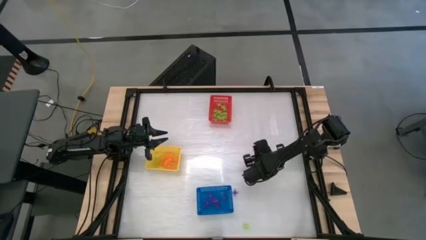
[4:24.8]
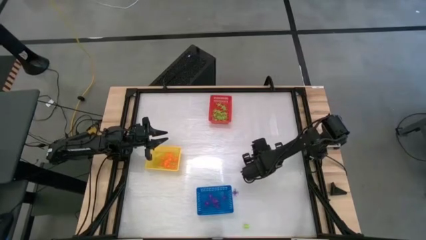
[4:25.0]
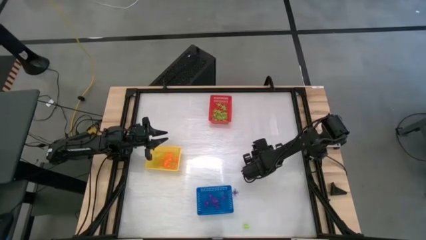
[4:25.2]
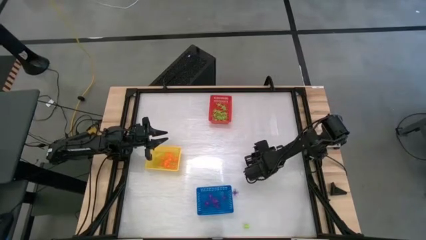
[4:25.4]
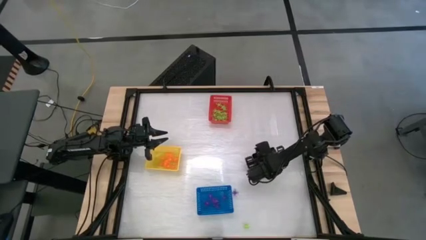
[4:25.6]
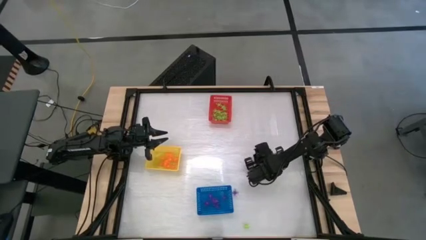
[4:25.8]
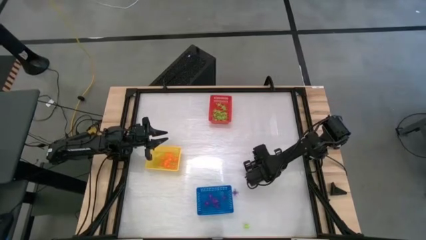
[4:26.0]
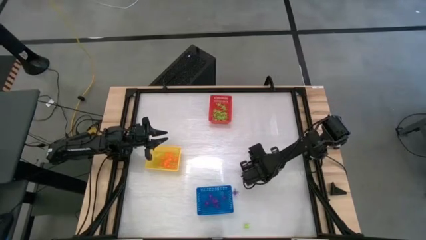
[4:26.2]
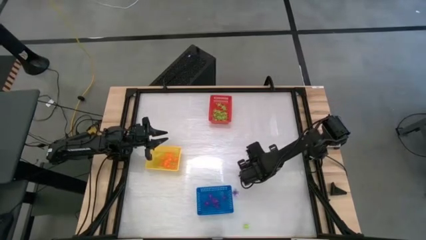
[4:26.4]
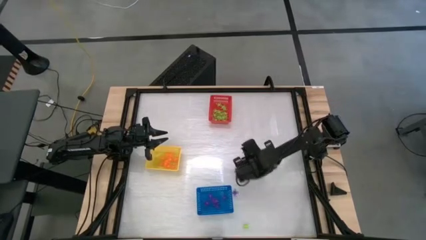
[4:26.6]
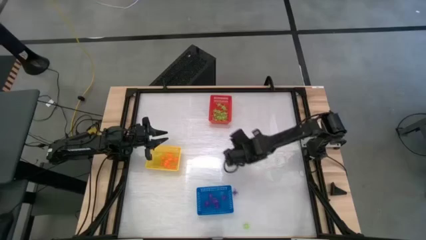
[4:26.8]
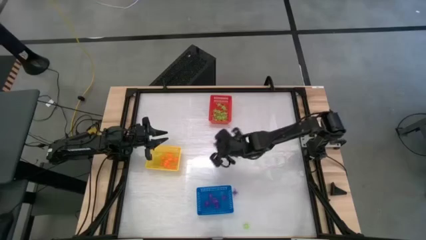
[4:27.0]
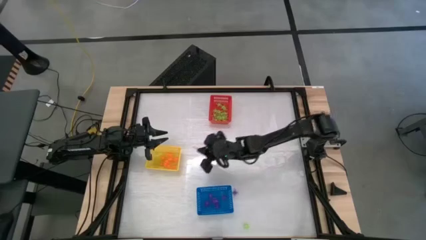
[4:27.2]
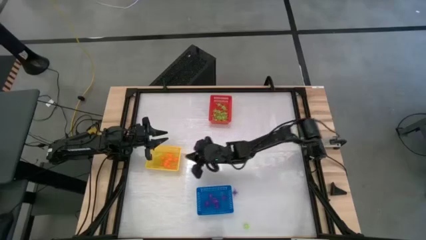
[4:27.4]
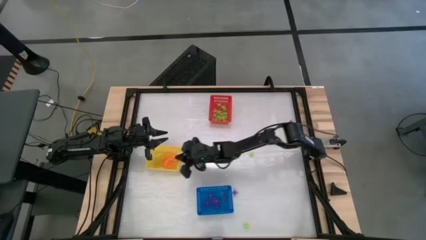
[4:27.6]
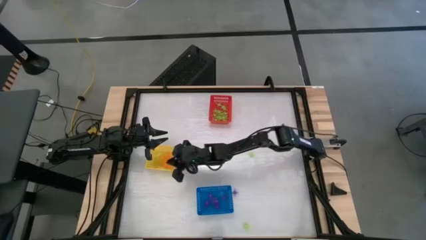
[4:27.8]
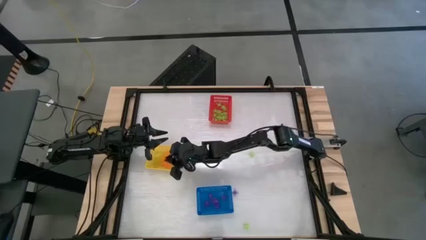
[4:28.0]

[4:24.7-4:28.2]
Task: Sort Halloween decoration
Put the orange spider toy into the yellow basket

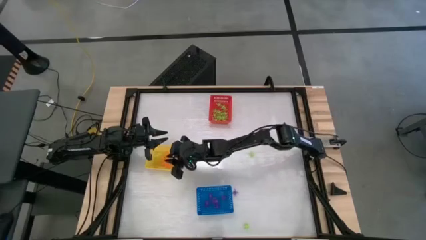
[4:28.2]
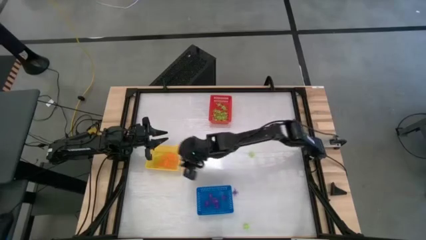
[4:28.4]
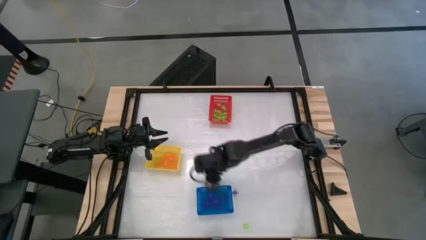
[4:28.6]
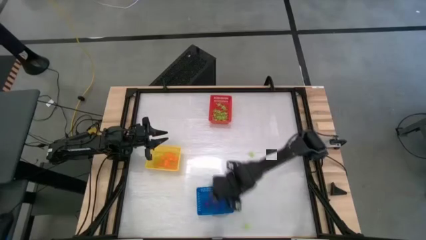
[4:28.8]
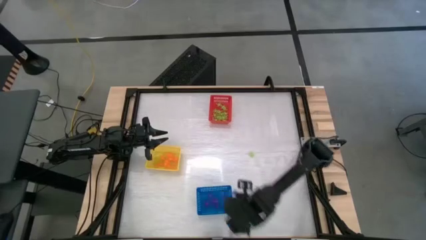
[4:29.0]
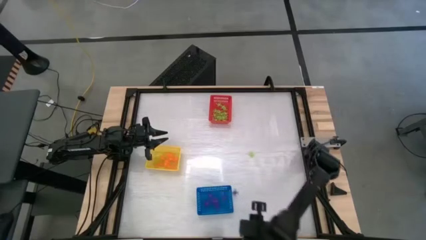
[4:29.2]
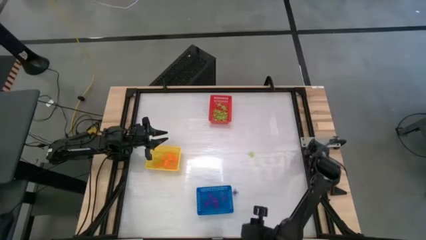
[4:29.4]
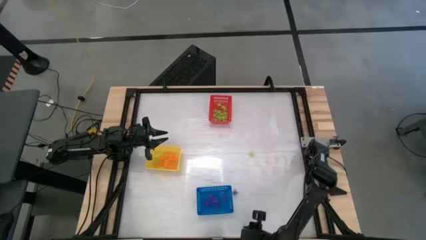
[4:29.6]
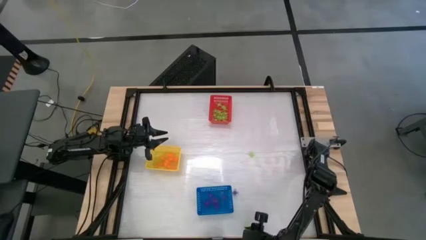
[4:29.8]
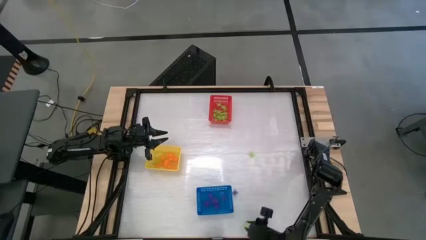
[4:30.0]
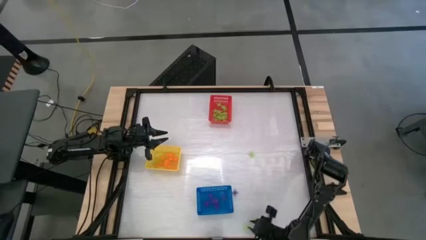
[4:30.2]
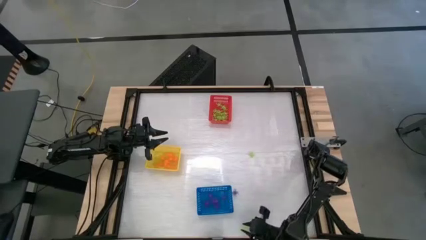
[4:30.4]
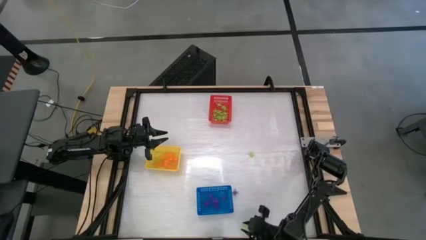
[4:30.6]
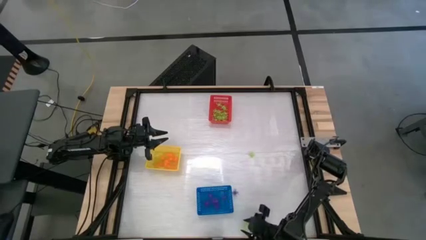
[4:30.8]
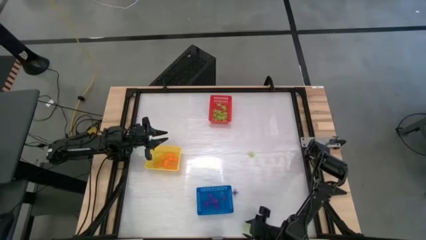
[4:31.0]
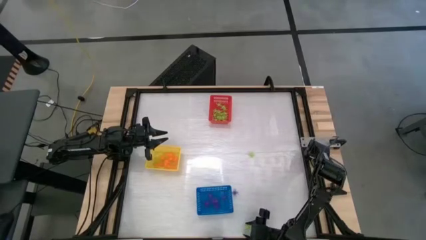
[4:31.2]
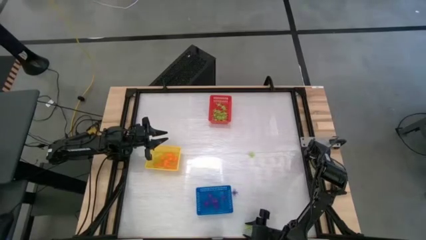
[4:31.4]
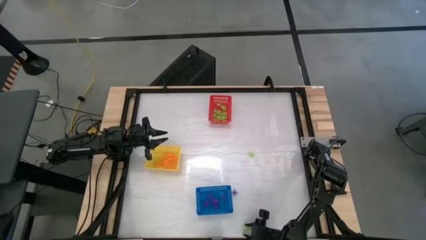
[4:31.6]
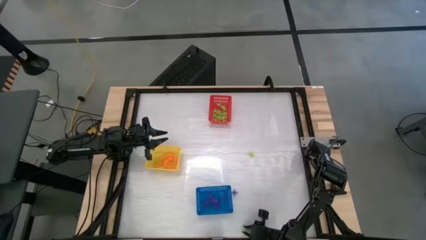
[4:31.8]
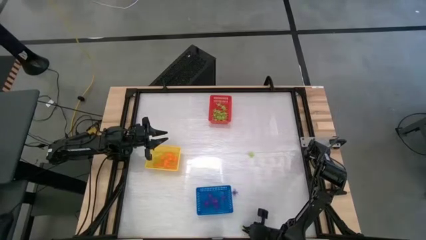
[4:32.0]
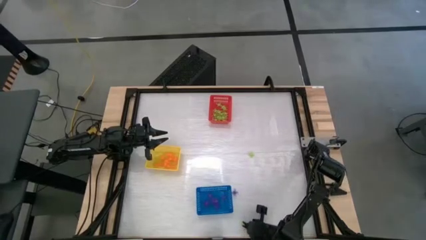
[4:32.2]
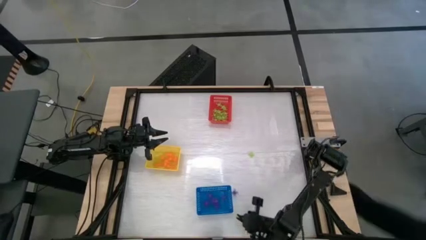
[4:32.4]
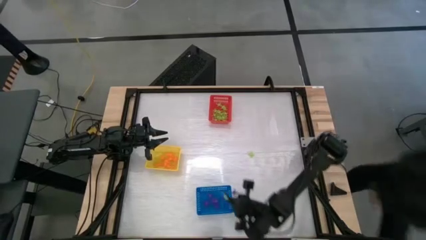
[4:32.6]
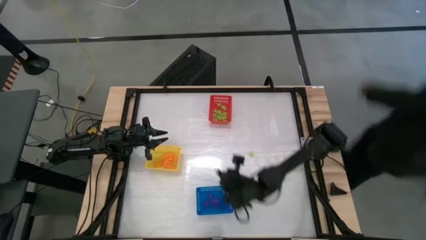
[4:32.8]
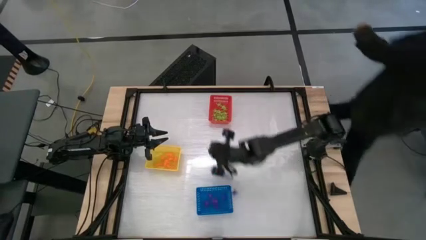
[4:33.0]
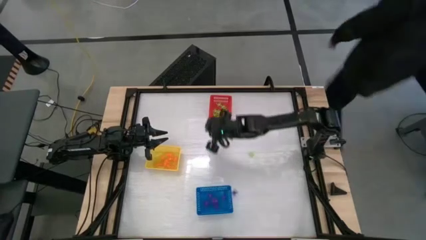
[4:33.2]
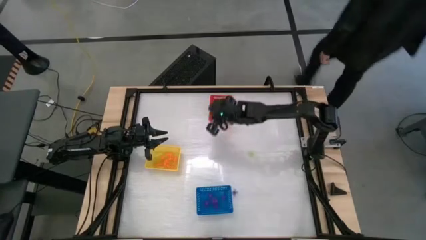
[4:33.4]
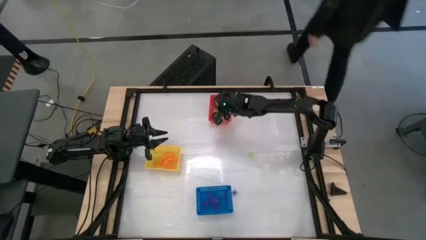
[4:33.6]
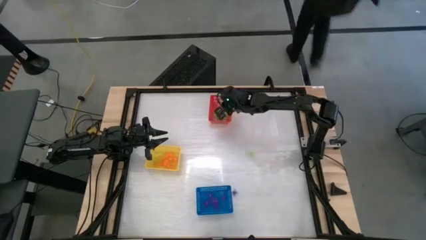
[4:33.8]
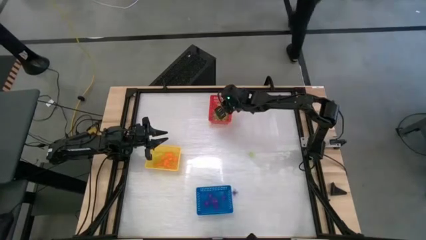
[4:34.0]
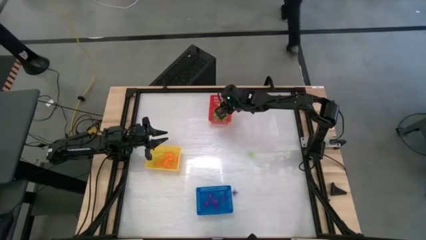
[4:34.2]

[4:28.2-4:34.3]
Put the green spider toy into the red basket

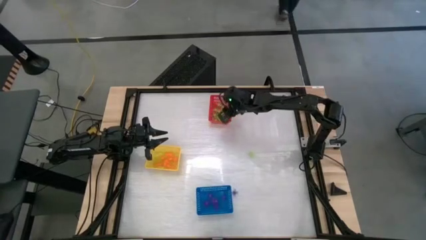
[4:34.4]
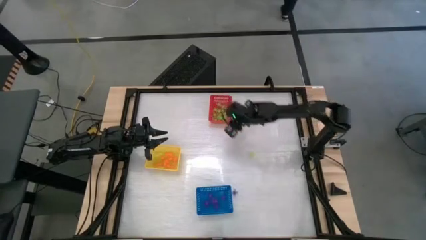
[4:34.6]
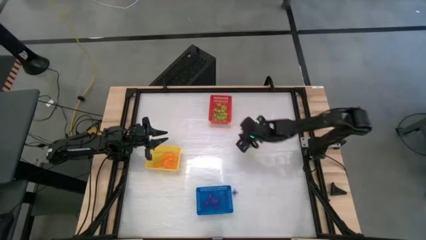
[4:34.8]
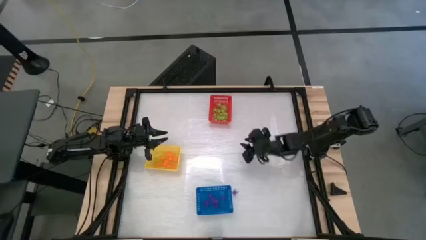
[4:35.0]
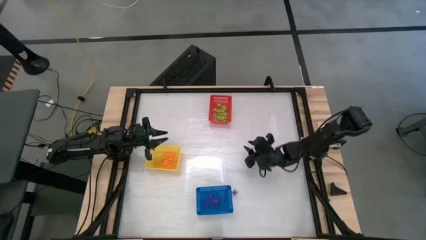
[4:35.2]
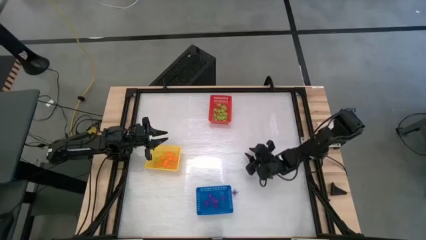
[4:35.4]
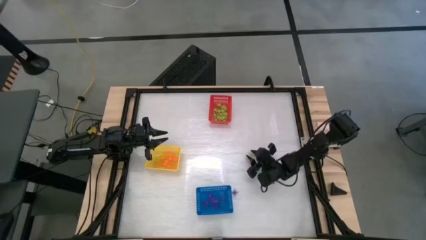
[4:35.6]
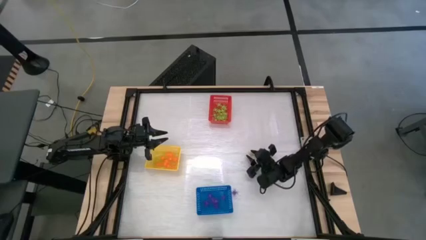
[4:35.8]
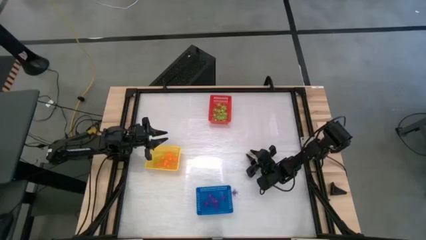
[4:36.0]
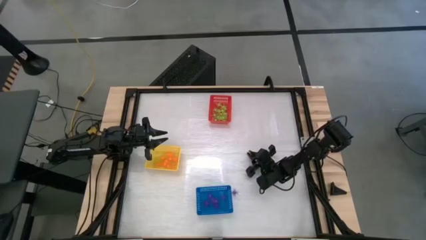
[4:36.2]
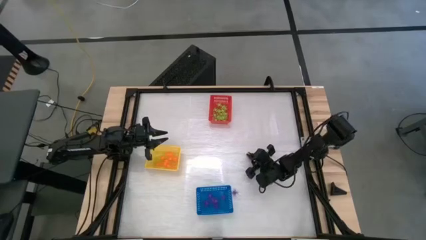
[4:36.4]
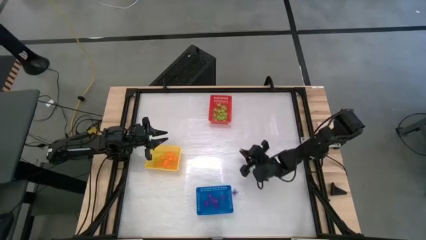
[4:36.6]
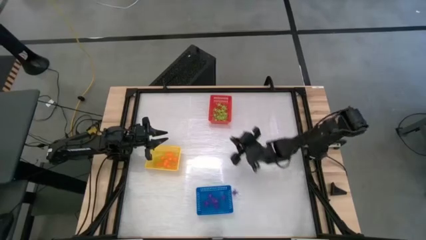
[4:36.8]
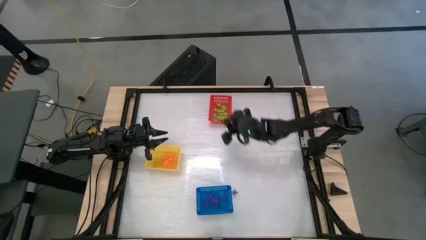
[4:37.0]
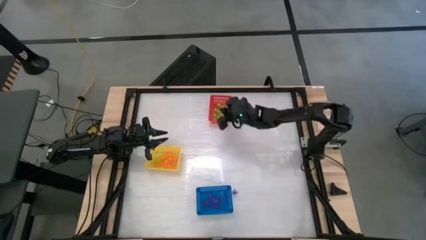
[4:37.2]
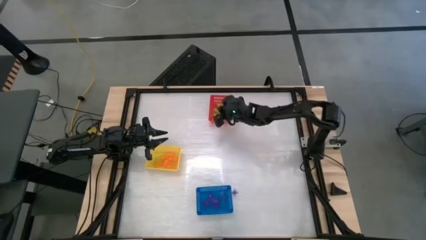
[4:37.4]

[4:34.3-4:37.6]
Put the green spider toy into the red basket

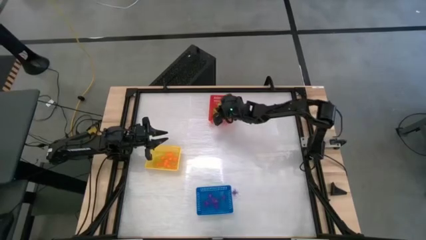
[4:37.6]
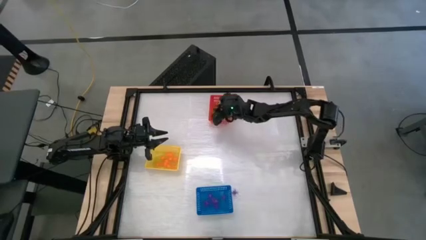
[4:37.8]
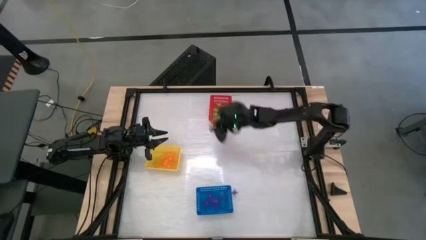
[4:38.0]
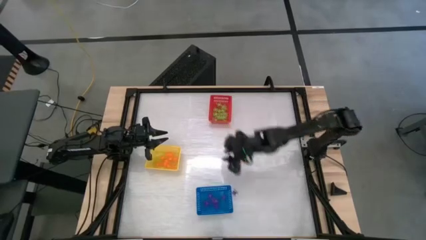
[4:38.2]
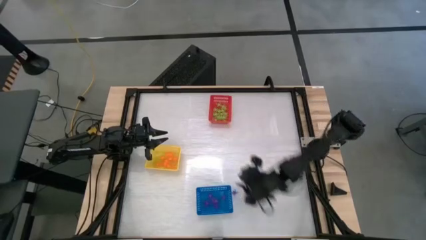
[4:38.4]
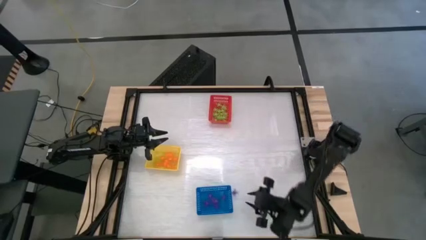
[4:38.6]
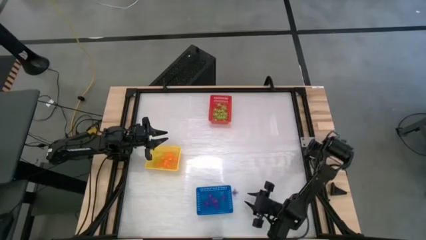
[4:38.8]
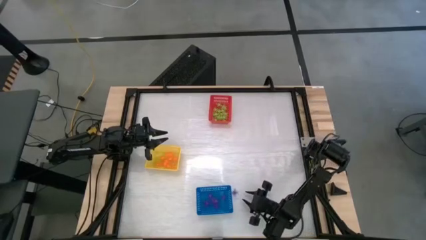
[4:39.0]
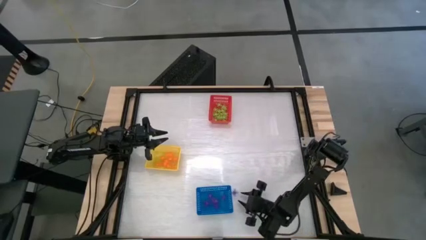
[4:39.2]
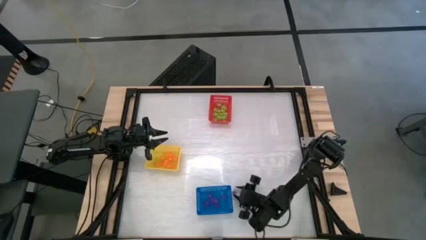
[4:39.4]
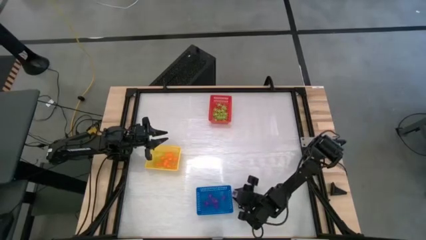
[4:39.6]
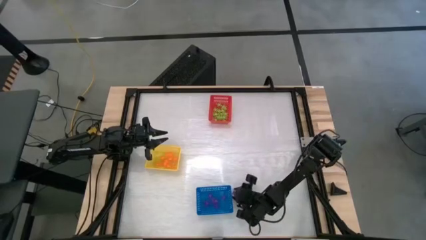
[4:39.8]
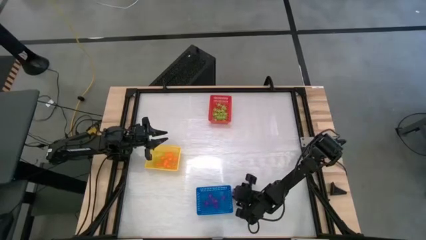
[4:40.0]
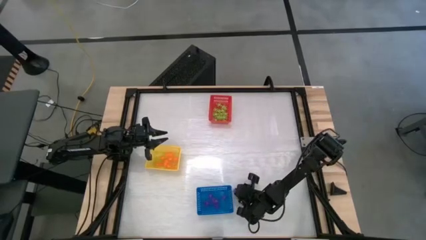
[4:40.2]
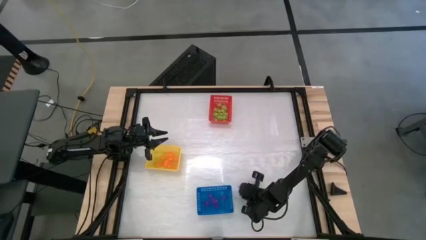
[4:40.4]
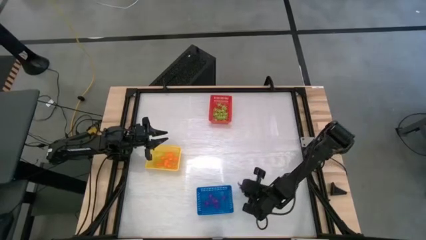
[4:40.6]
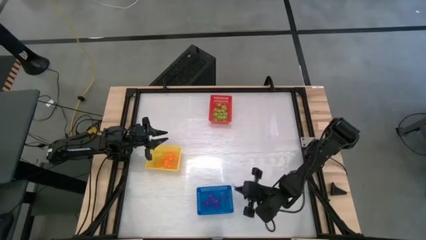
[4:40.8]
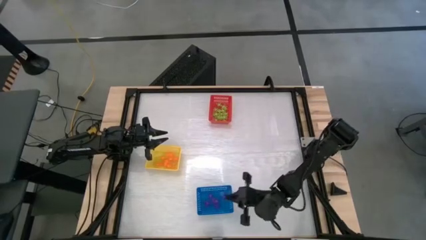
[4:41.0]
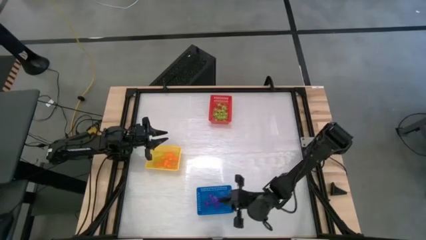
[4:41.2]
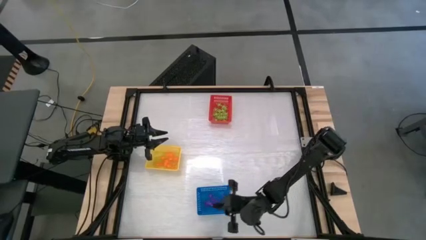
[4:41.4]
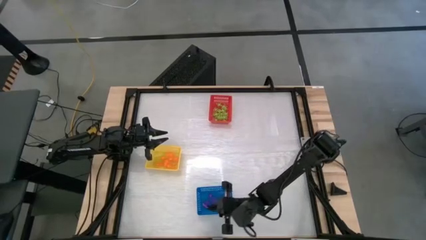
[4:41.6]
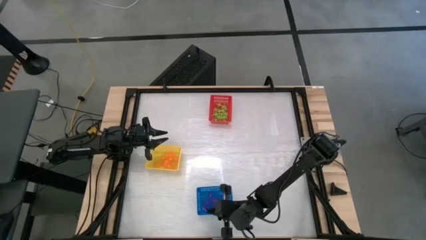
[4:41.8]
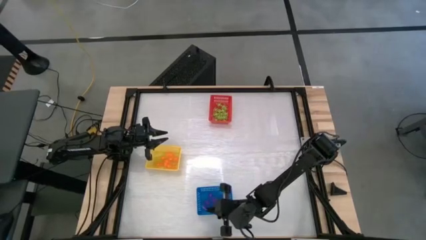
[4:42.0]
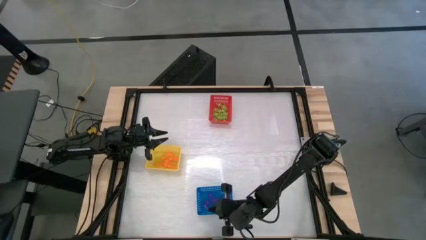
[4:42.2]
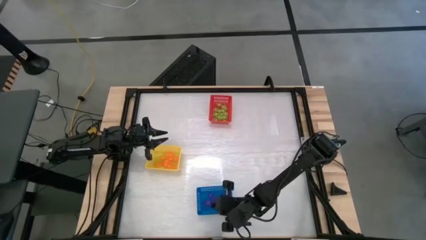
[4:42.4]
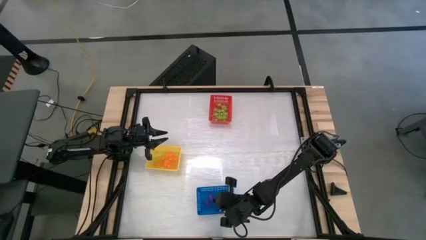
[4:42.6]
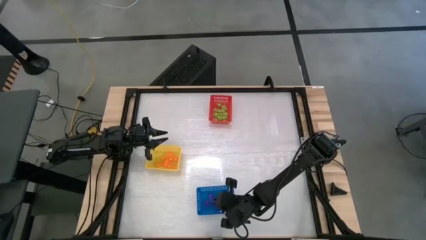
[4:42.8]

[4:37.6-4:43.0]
Put the purple spider toy into the blue basket
